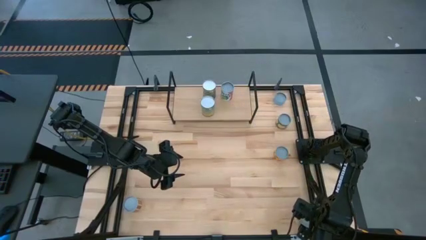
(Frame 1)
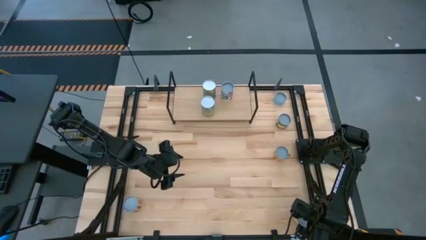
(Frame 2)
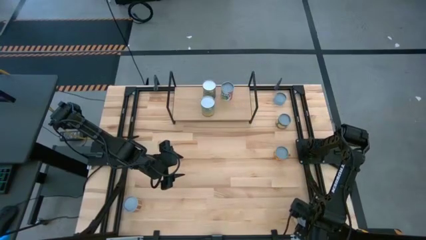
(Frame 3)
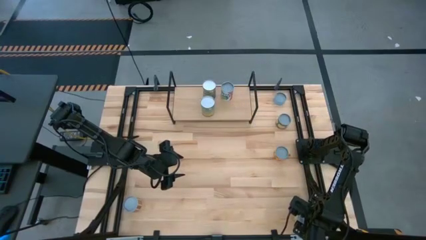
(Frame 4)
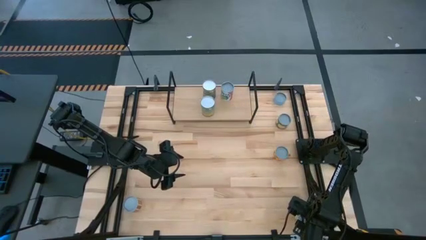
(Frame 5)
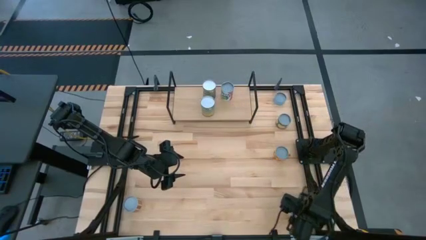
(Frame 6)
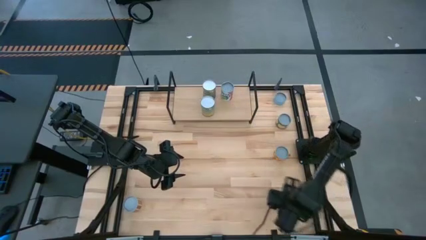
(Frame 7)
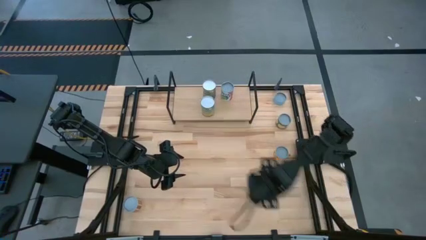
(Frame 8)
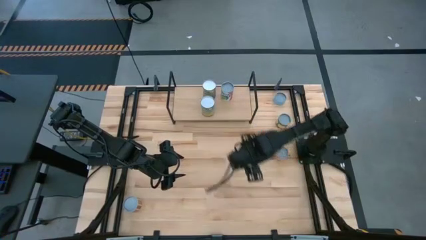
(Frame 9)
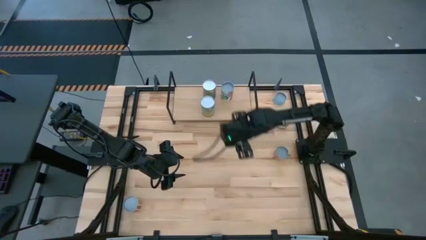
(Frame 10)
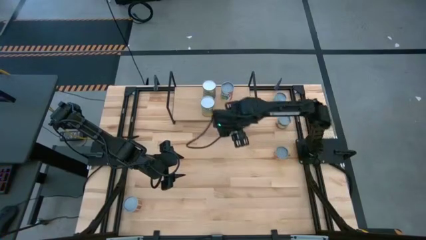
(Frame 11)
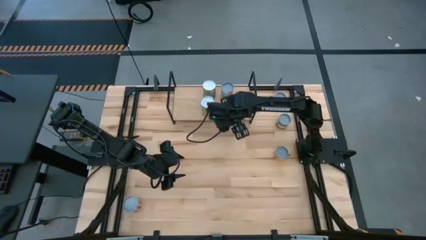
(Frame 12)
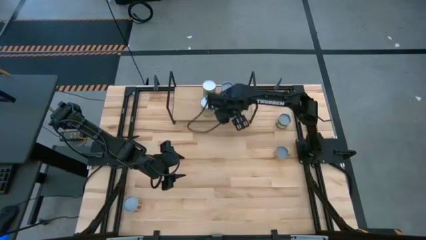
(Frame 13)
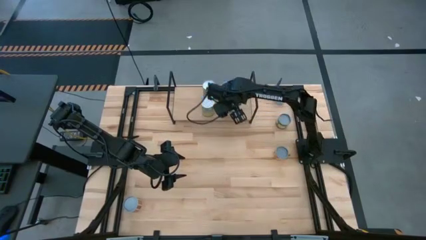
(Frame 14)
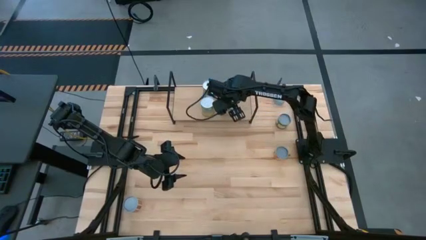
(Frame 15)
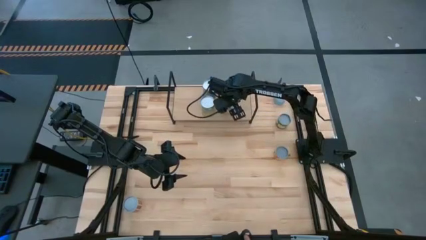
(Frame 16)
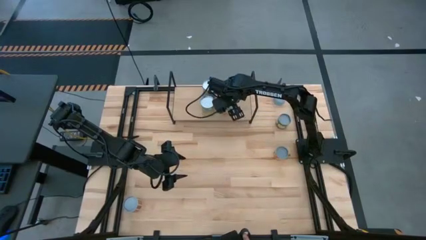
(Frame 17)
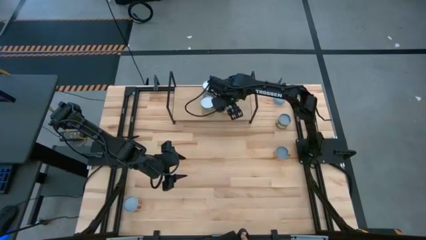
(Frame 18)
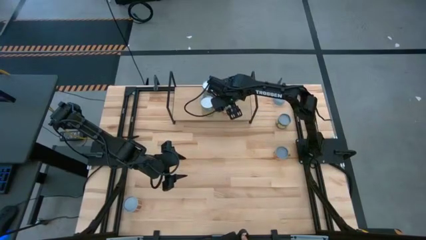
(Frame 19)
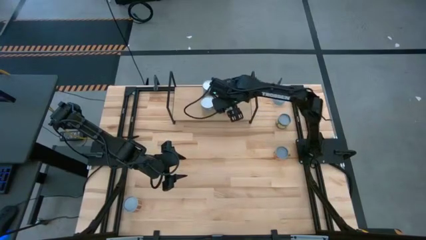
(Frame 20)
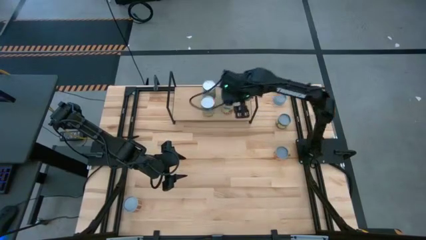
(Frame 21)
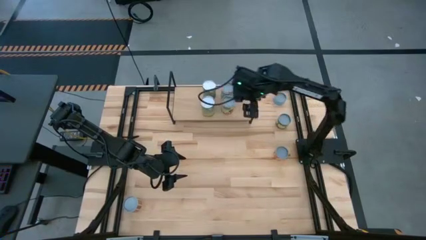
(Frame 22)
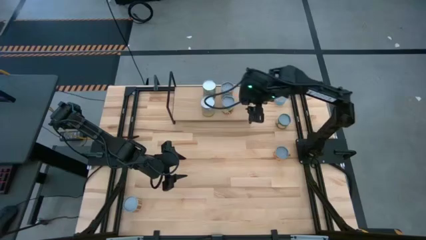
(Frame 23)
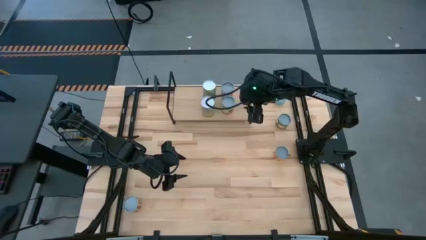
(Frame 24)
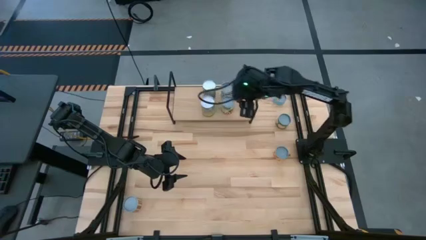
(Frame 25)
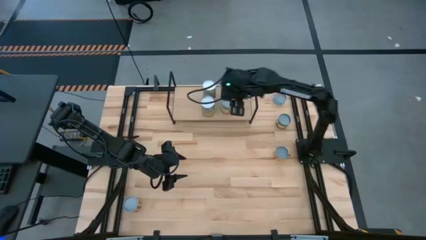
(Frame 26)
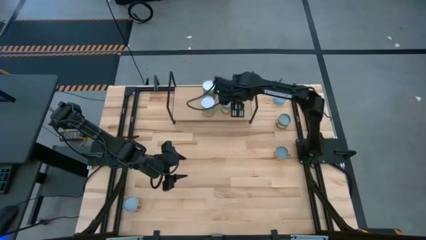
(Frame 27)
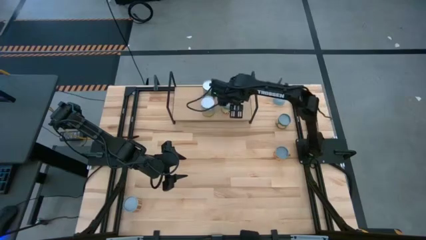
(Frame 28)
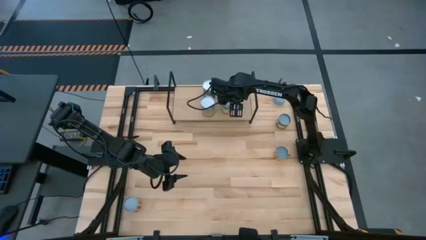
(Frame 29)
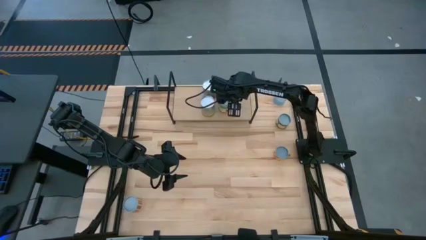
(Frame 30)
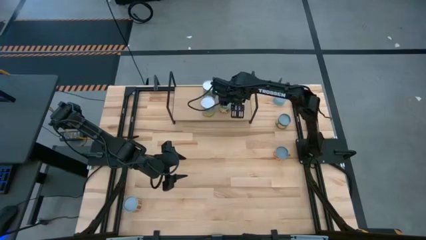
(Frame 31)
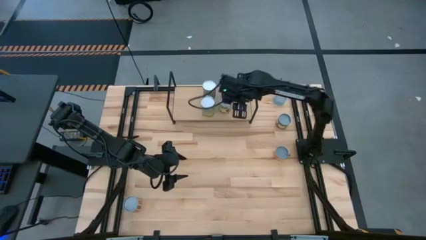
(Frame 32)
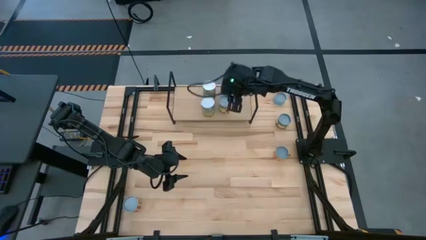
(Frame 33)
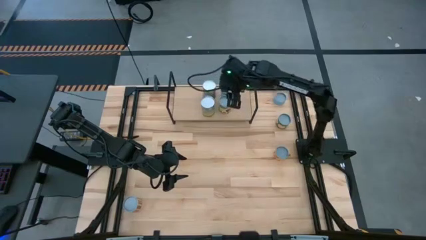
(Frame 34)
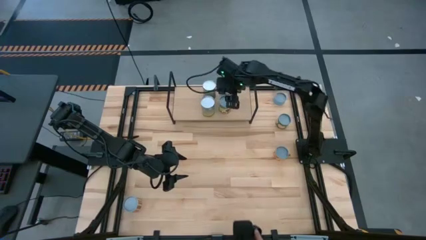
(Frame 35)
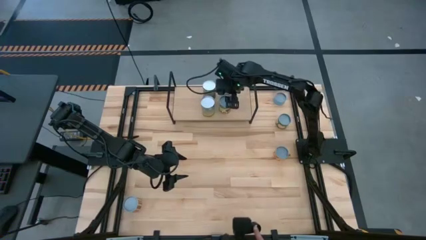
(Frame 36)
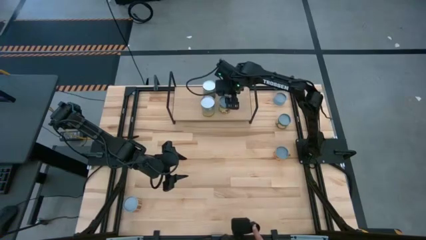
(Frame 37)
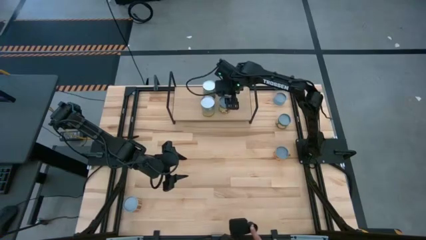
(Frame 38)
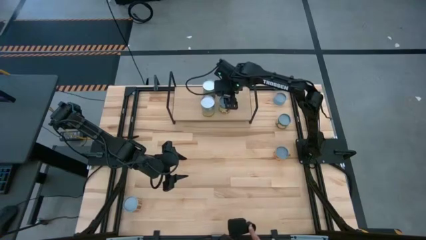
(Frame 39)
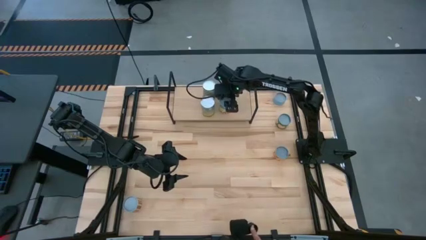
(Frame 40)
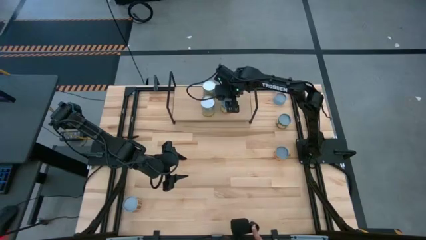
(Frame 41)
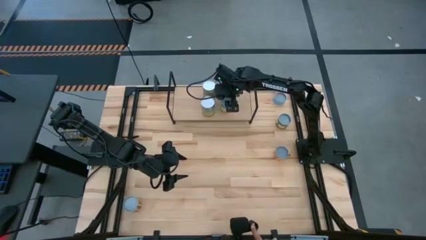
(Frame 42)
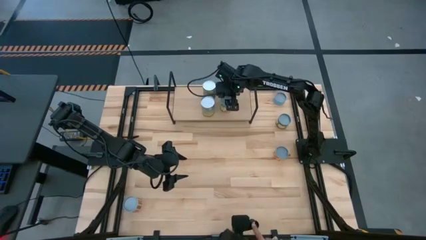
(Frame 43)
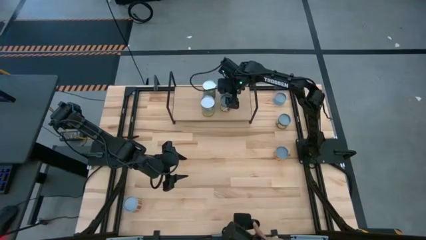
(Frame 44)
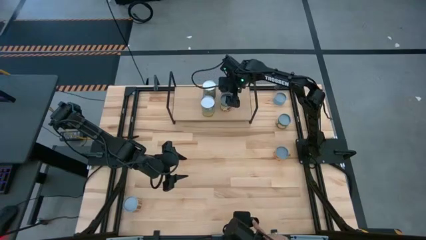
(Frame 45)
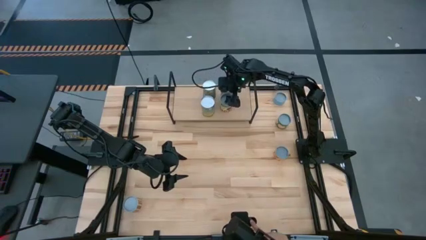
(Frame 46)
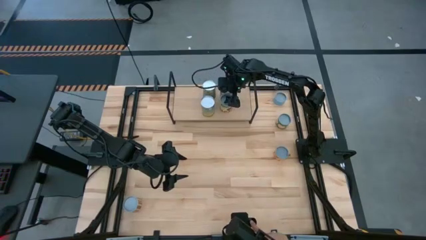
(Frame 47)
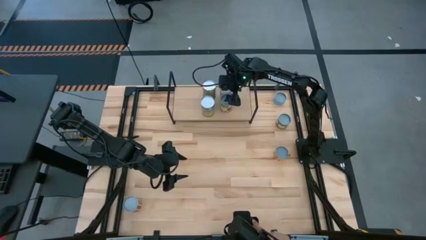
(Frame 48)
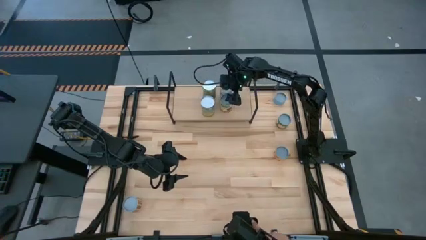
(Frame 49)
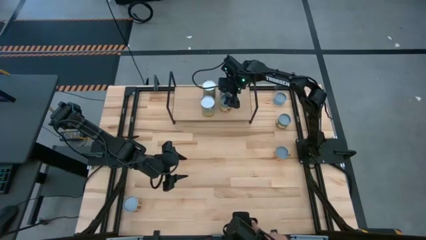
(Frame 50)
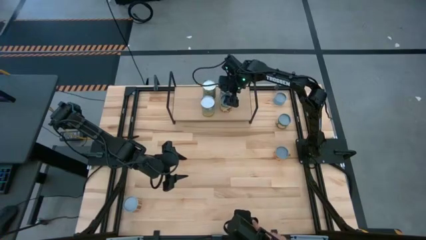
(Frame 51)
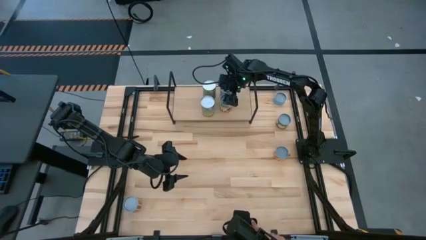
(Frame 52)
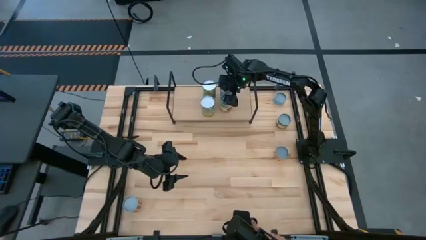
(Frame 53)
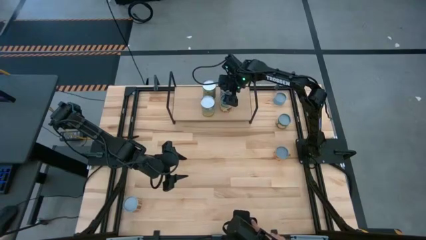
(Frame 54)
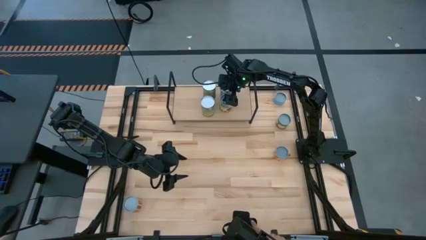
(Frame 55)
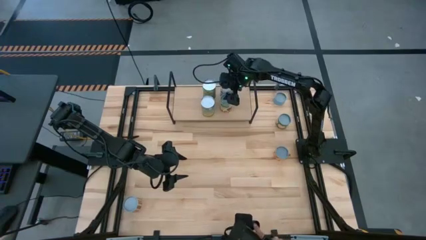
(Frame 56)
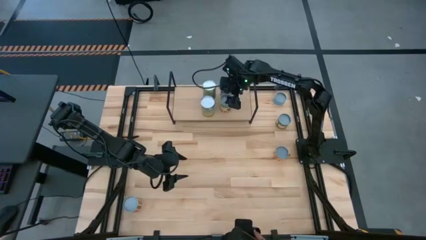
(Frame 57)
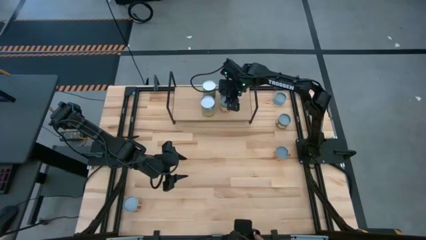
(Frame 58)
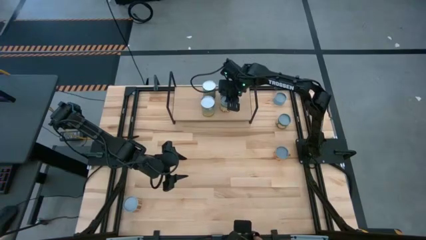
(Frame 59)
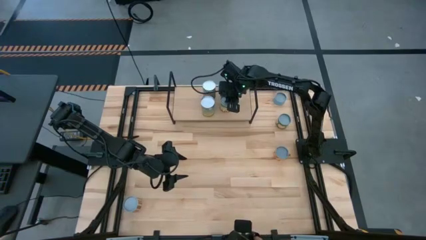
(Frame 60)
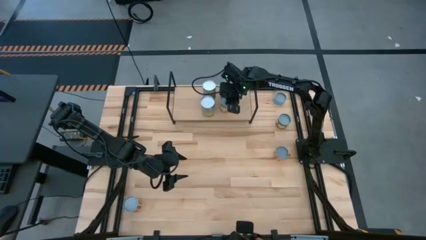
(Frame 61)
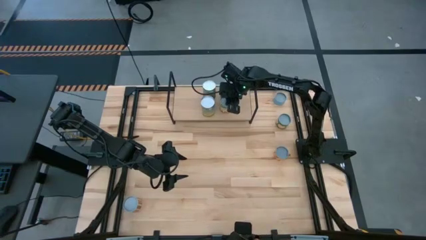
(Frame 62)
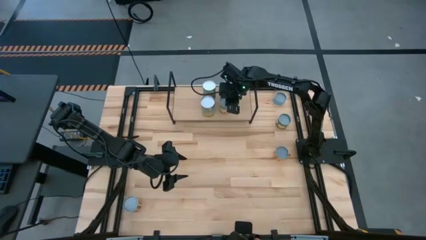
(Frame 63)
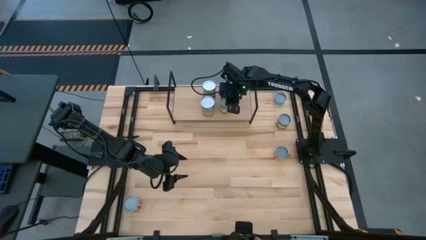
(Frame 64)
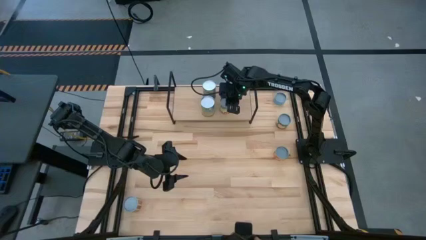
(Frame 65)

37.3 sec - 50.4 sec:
Task: Pick and place cans onto a shelf
Put the canned spaghetti sauce on the shelf
